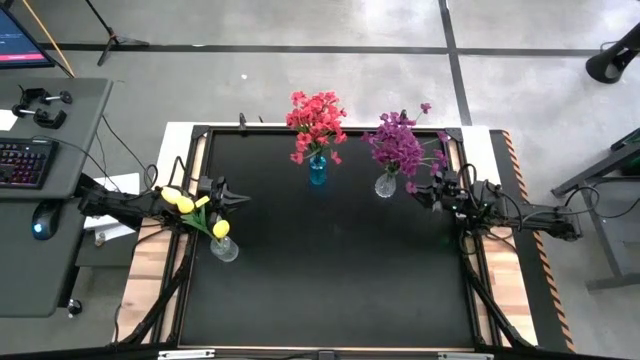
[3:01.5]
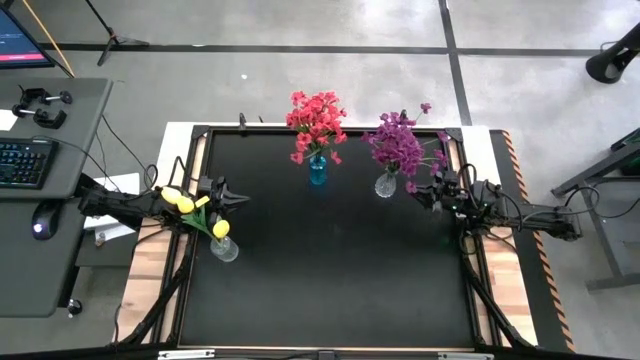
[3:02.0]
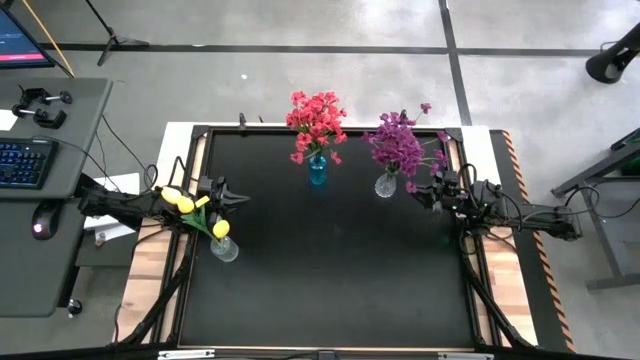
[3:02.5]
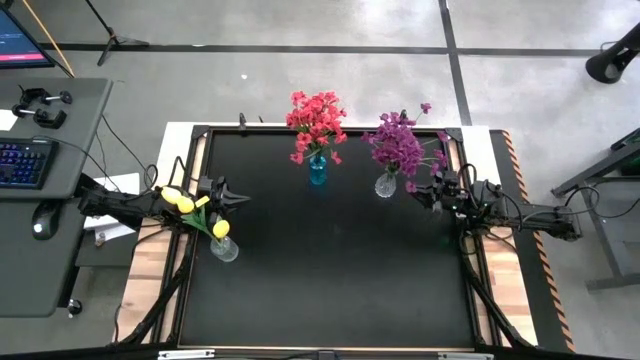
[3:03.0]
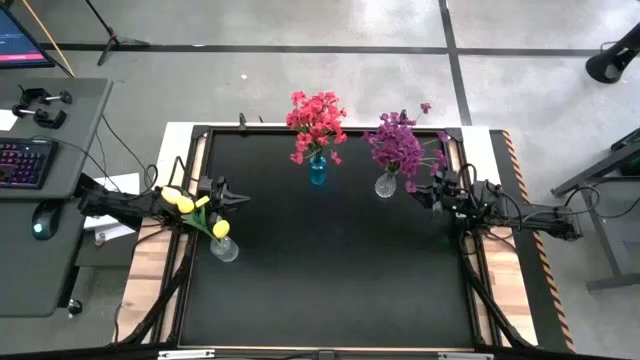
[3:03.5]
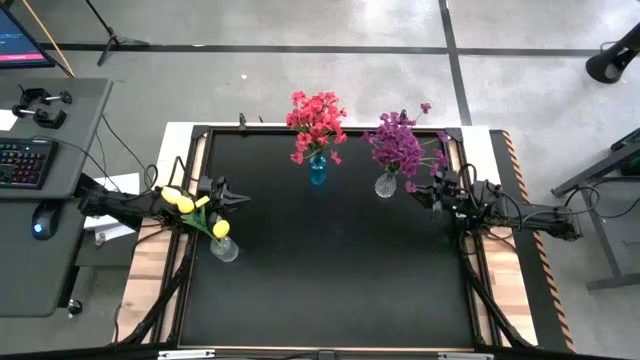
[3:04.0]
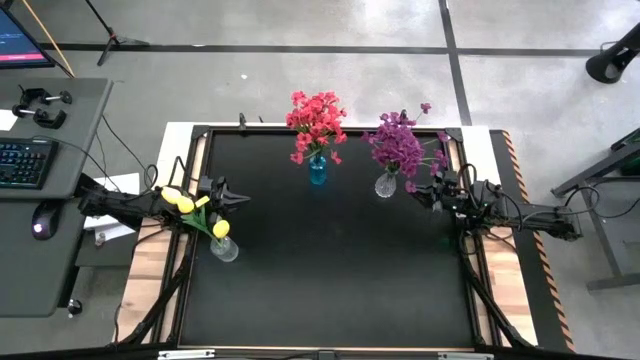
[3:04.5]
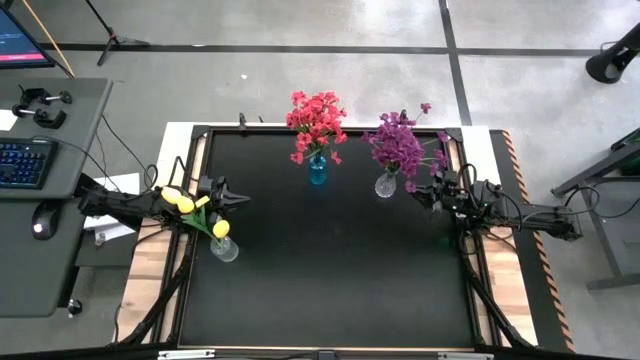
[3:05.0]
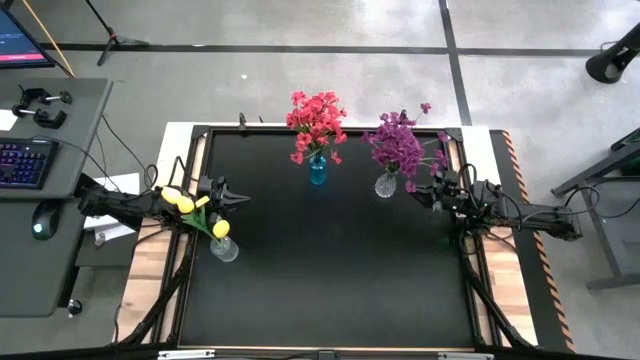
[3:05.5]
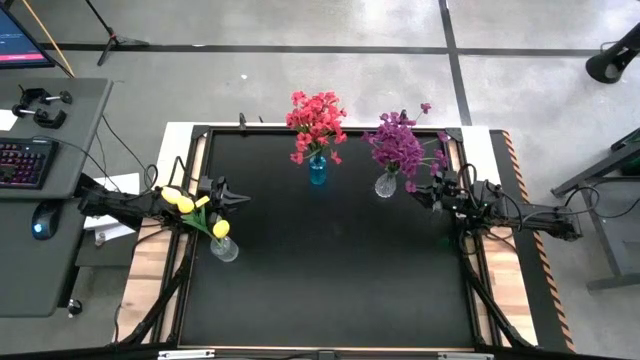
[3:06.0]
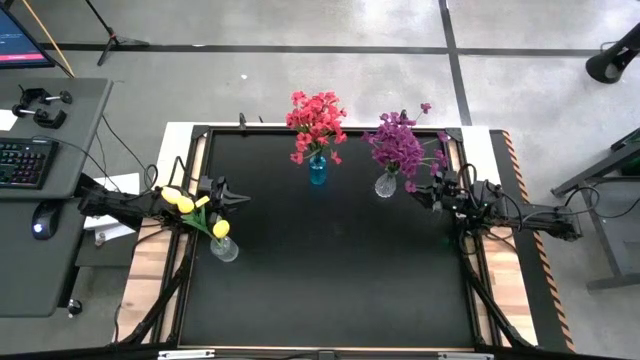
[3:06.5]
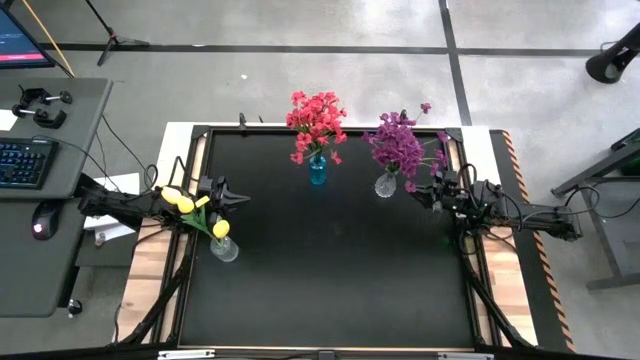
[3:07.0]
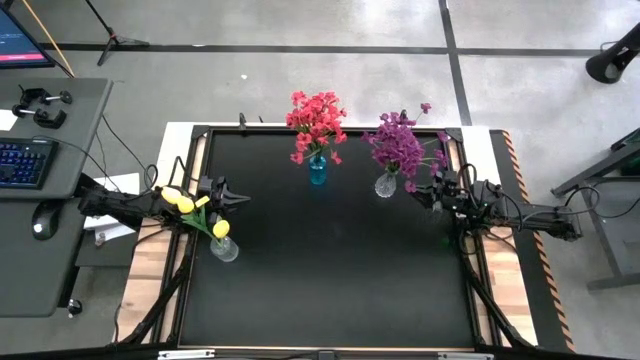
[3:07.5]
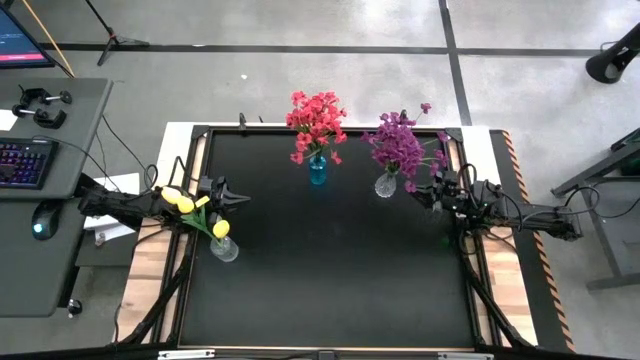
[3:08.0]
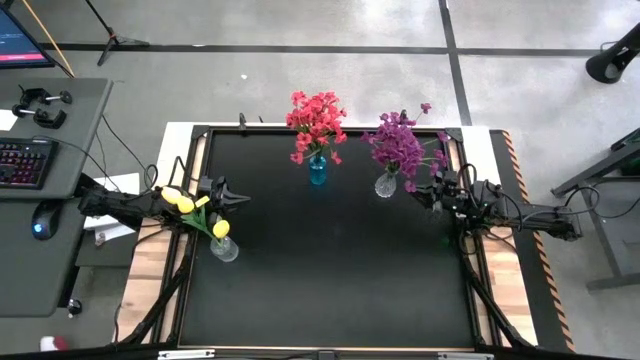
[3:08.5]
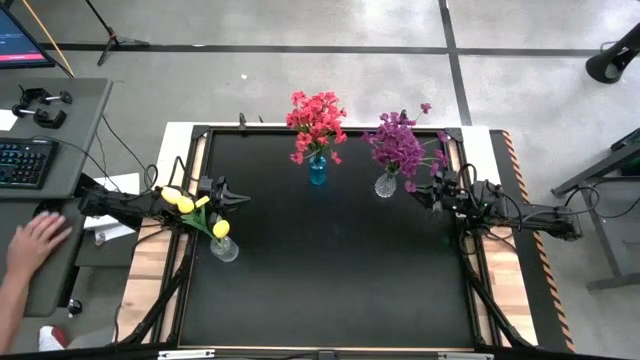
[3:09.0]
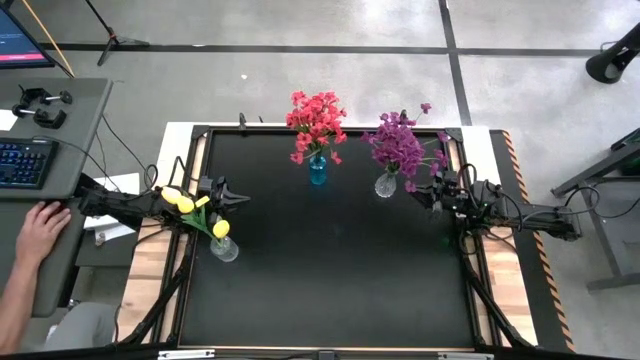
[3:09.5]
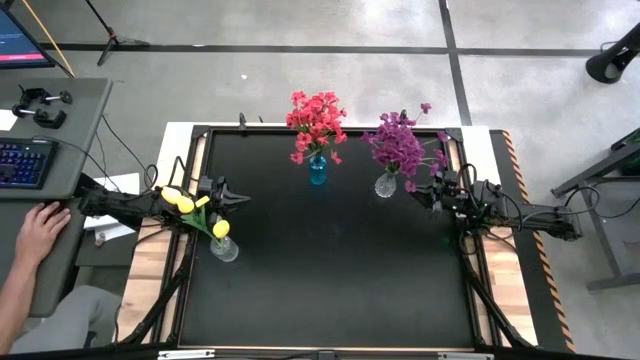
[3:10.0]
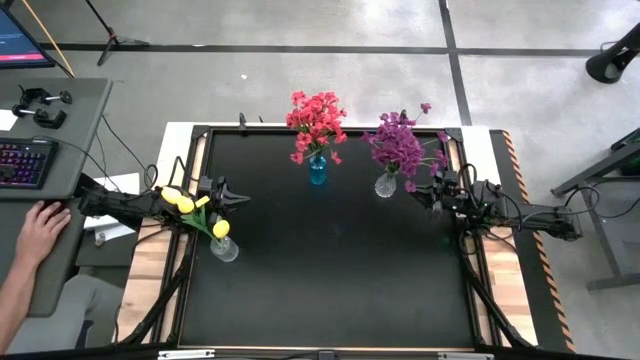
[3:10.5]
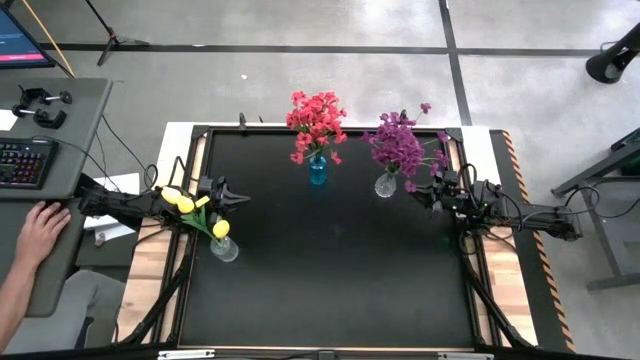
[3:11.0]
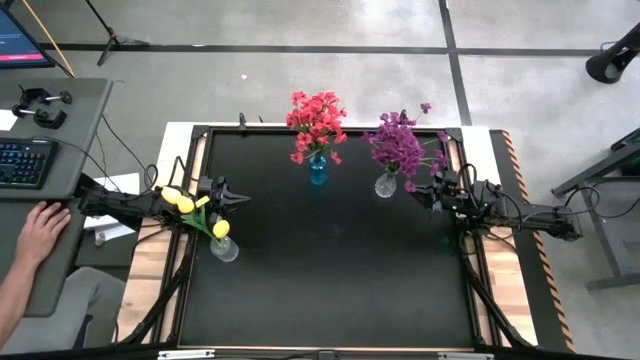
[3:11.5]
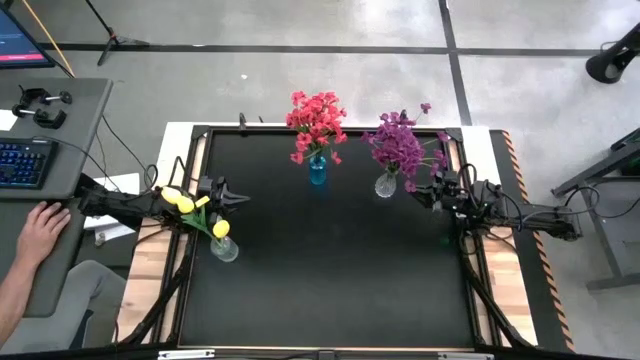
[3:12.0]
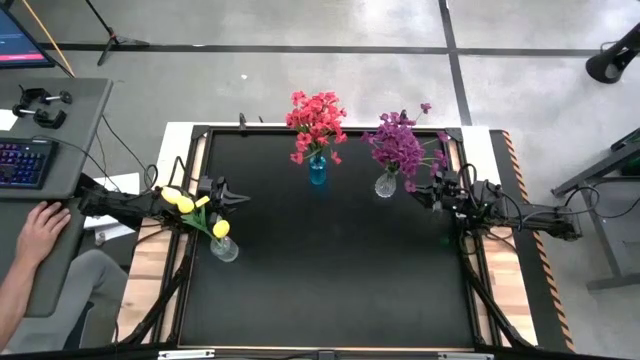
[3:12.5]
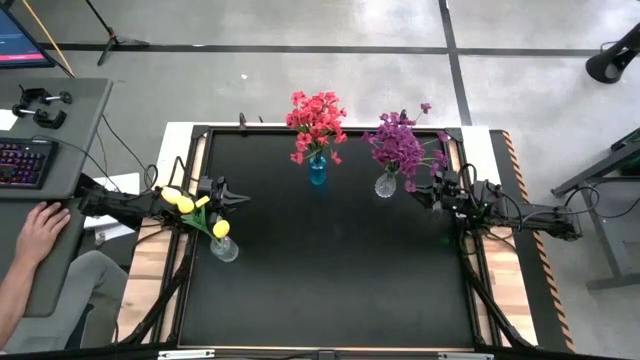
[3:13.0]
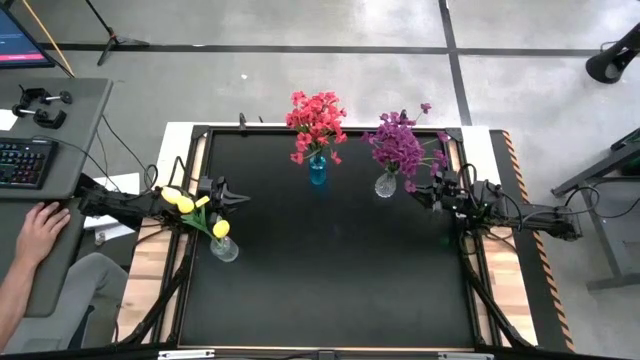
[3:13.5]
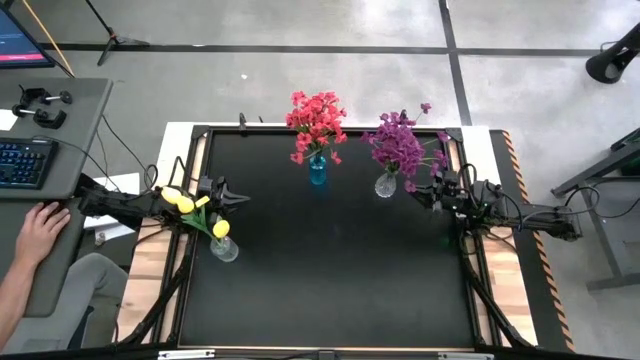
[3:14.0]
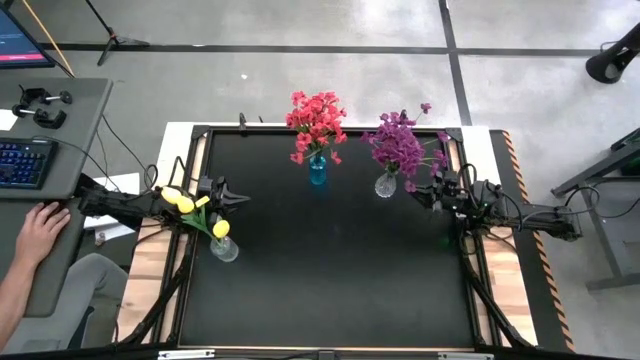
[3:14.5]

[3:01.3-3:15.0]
Task: Sort flowers into vase by color
Return to Home Position
